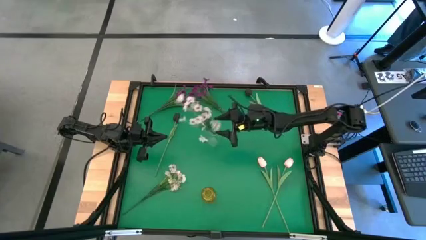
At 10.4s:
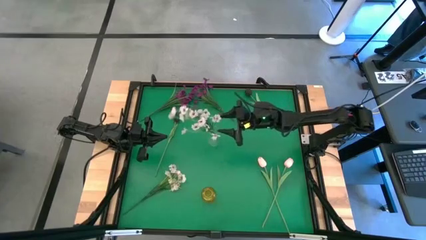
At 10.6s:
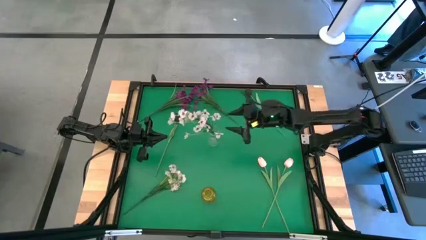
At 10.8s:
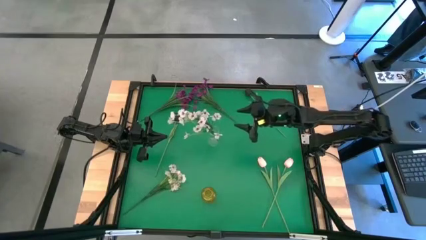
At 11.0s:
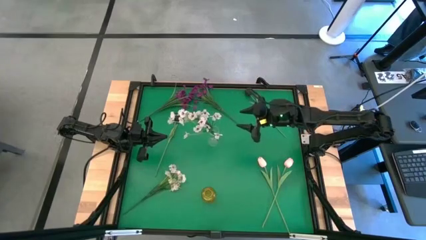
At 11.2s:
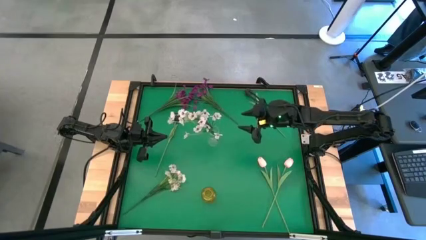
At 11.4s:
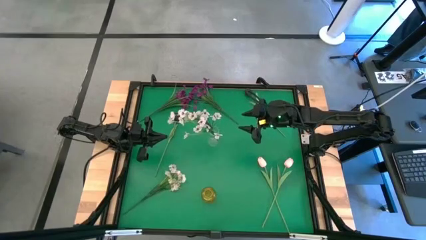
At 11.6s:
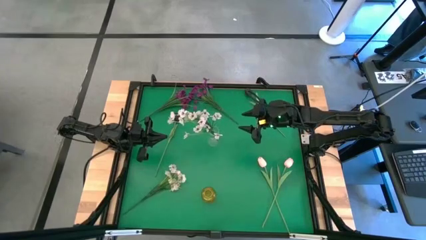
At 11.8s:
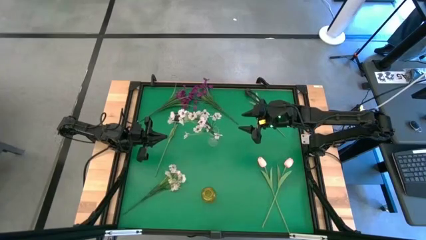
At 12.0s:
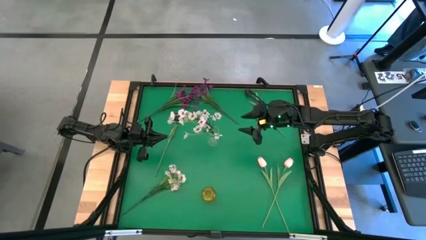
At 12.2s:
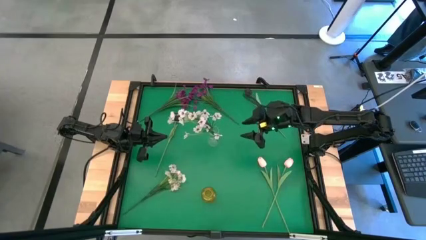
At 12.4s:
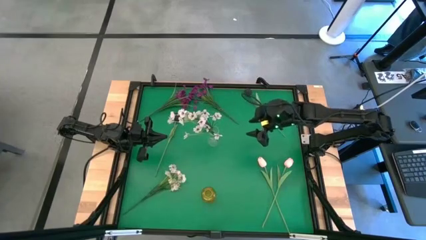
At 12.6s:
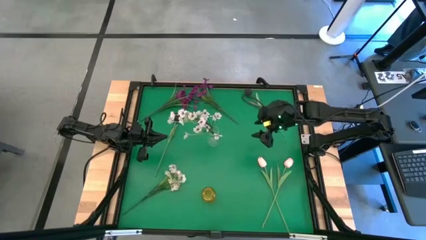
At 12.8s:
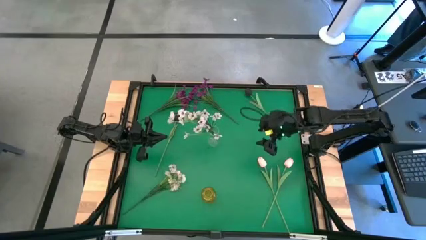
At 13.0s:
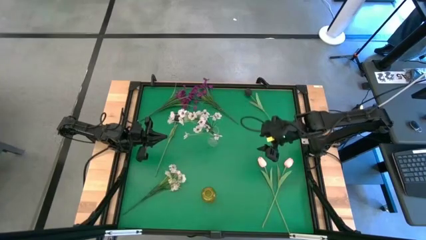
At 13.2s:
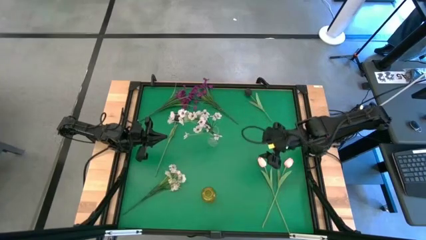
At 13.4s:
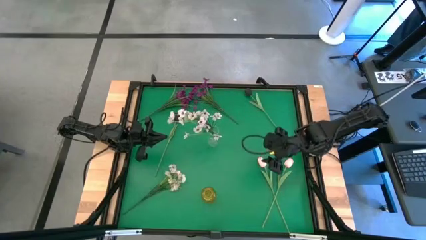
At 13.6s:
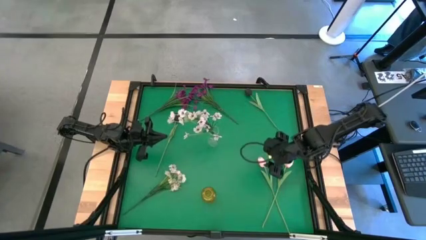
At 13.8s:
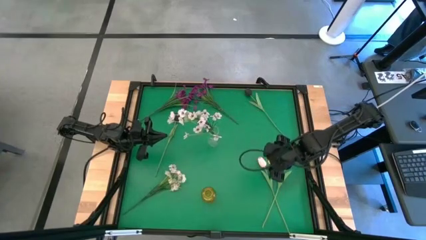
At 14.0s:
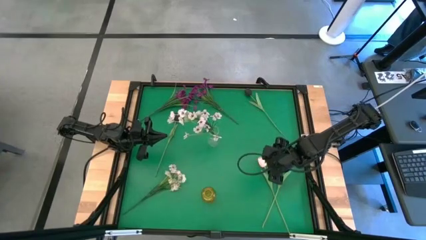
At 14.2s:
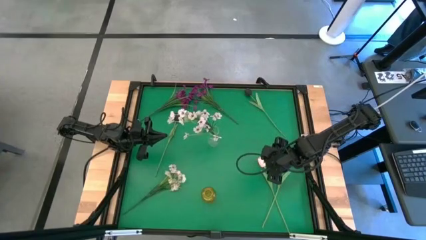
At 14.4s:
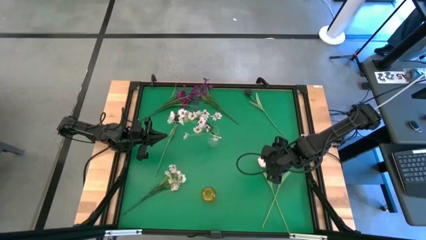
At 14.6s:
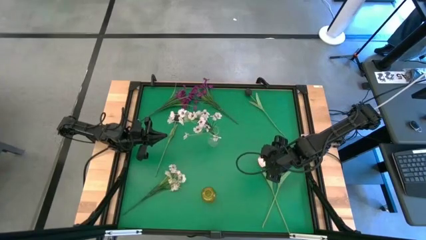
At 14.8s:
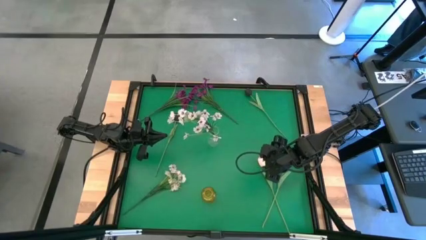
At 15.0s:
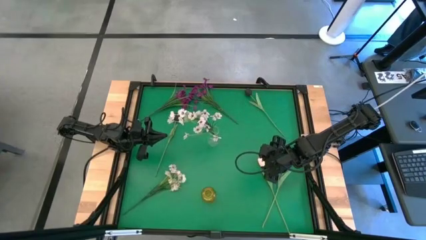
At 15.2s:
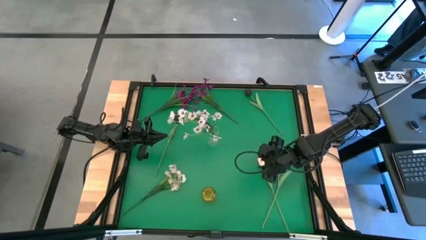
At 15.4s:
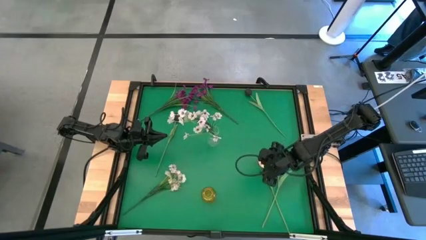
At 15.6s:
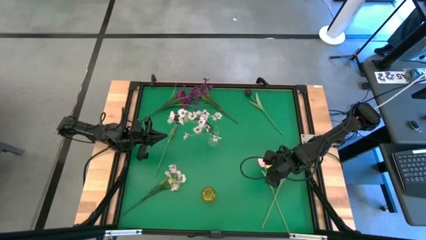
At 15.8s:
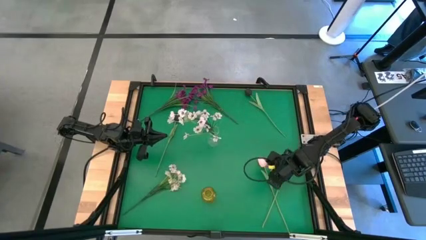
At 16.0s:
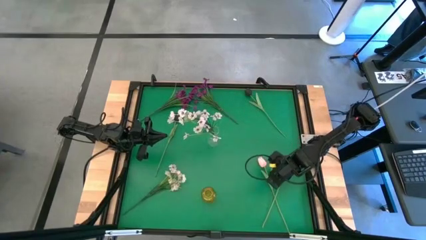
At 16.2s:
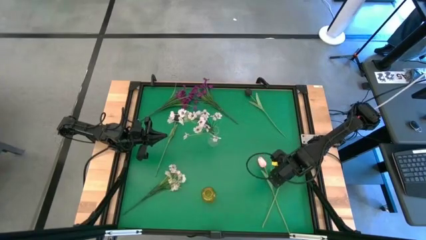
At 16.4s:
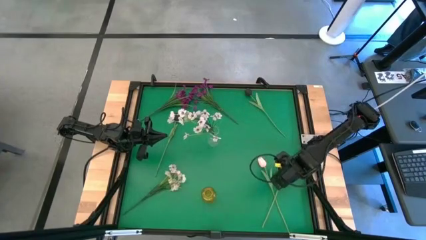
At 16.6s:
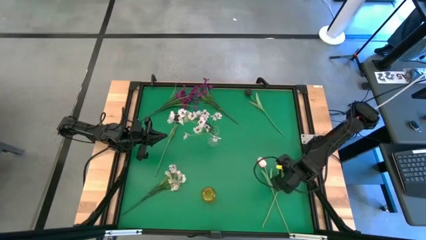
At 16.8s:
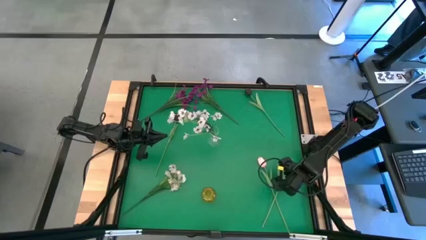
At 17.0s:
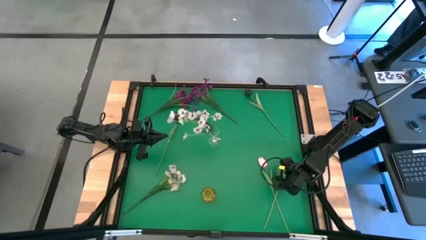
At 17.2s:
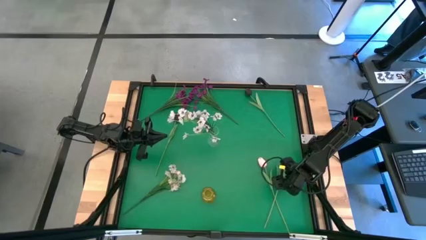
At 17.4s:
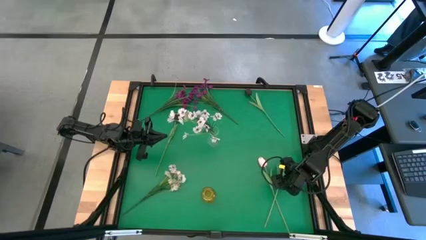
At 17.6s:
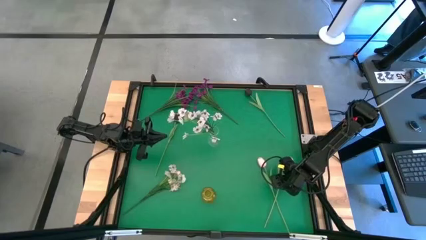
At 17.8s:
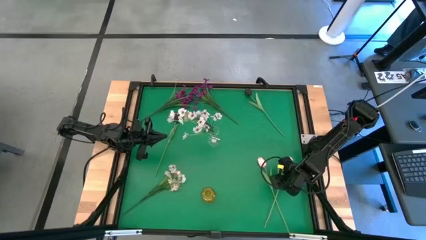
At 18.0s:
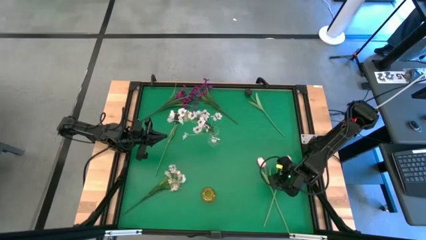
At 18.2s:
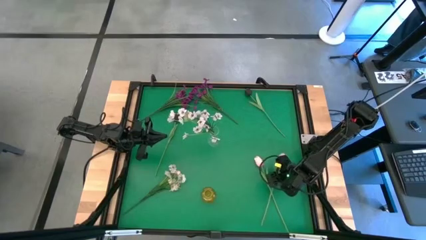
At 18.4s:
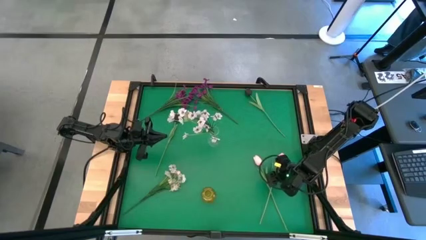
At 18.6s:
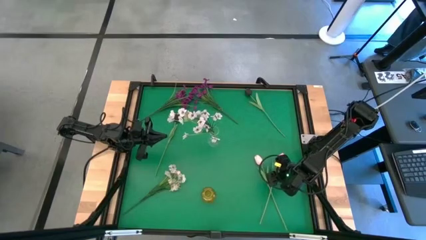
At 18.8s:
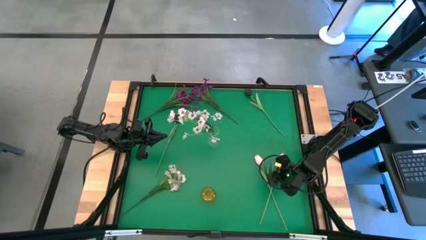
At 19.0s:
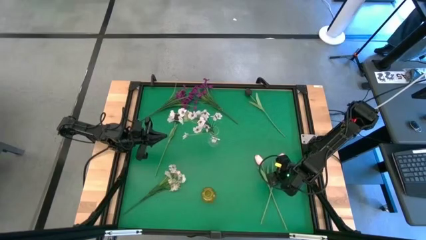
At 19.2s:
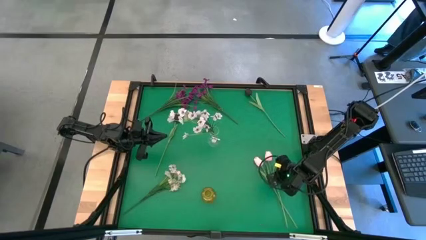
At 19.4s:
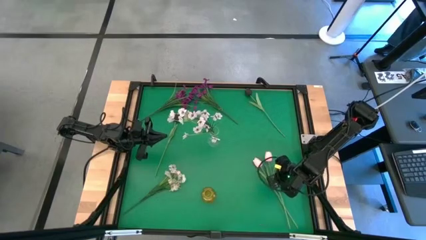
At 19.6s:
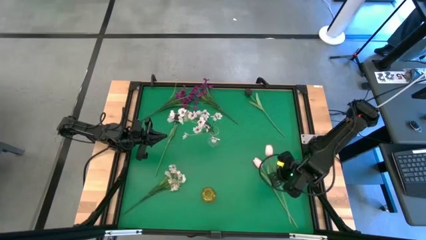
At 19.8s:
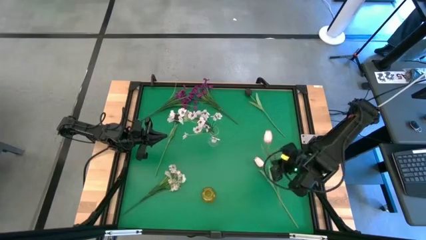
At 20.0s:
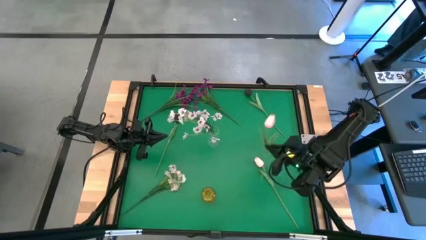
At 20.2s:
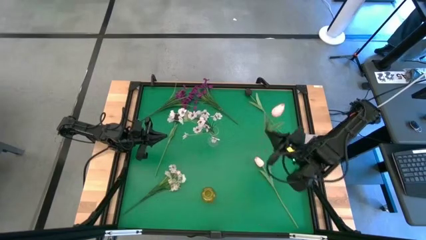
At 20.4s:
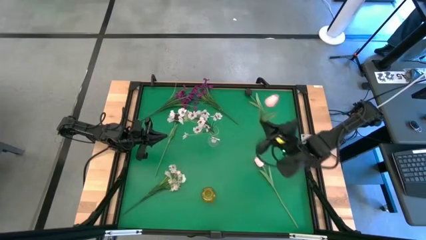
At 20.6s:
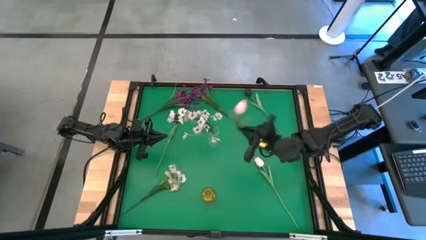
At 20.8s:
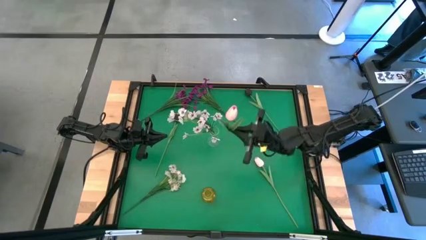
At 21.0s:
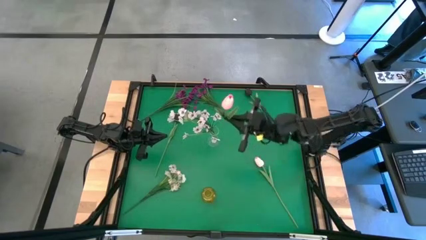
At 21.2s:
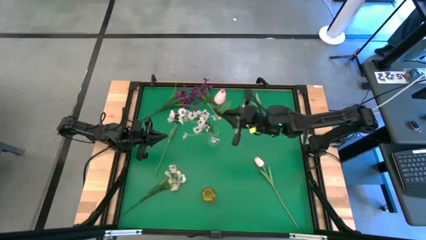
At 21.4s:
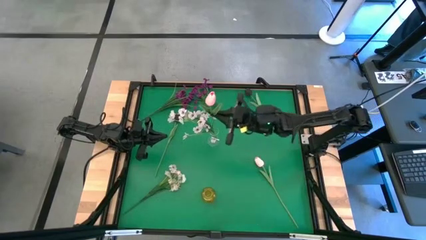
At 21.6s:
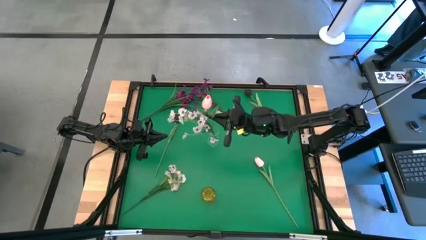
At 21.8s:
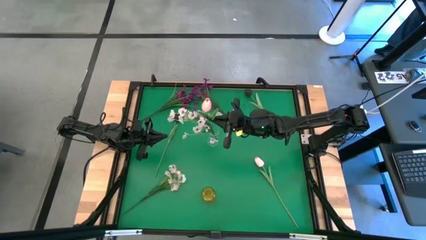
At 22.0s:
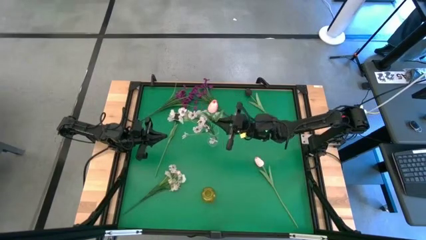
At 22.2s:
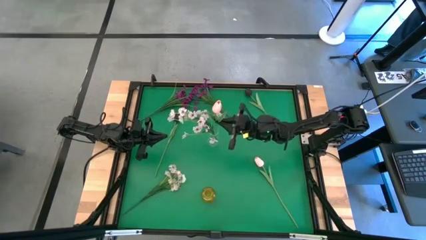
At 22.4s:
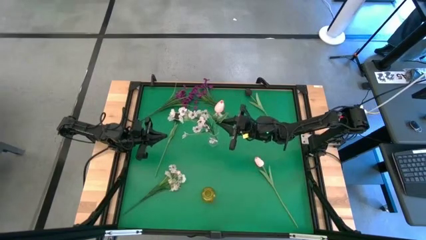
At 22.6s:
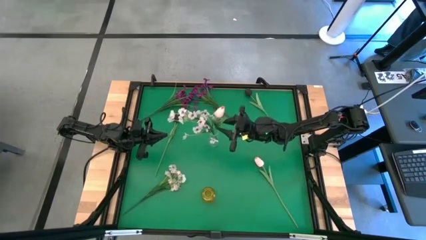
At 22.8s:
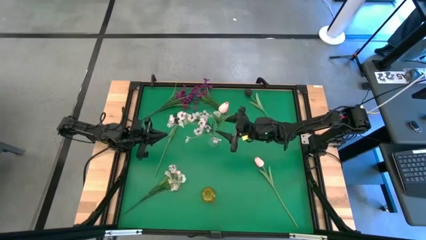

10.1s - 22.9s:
Task: Sort flowers into vase by color
Put the pink tulip flower into the transparent vase

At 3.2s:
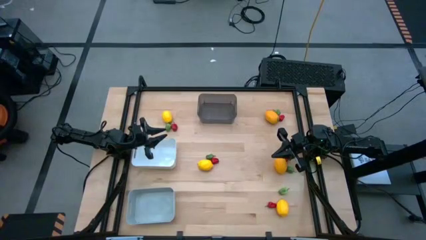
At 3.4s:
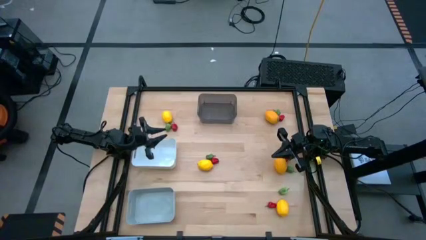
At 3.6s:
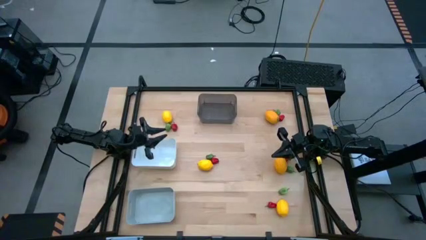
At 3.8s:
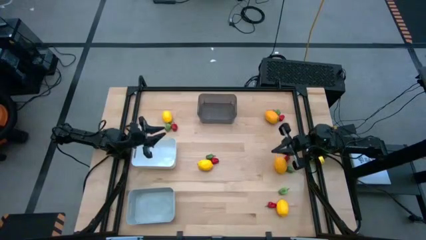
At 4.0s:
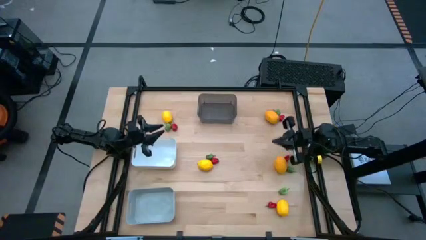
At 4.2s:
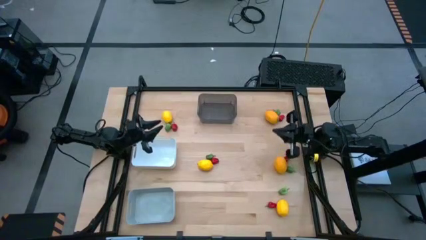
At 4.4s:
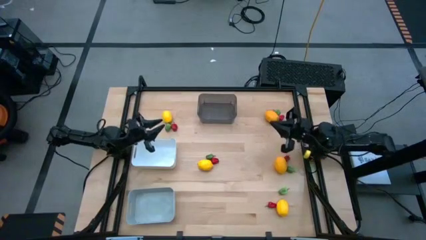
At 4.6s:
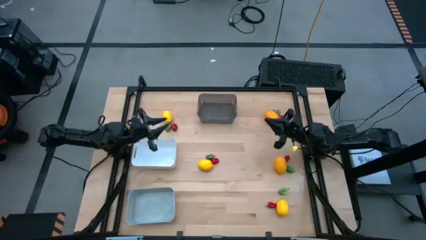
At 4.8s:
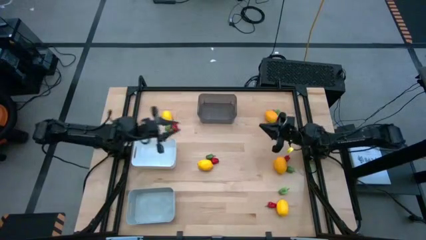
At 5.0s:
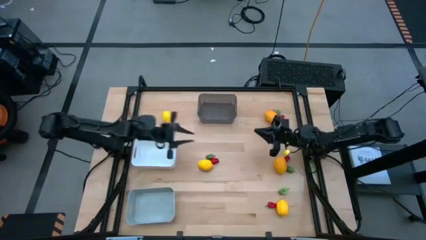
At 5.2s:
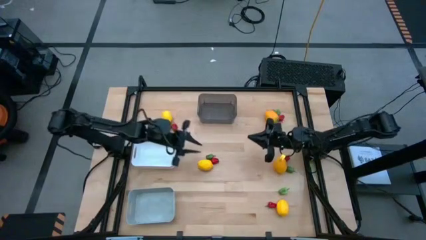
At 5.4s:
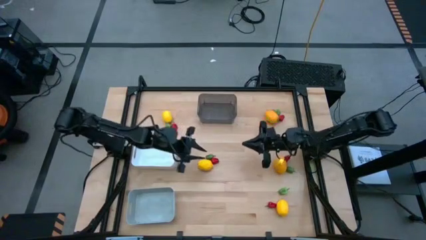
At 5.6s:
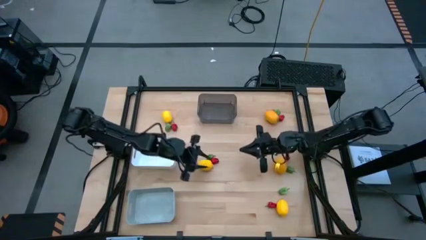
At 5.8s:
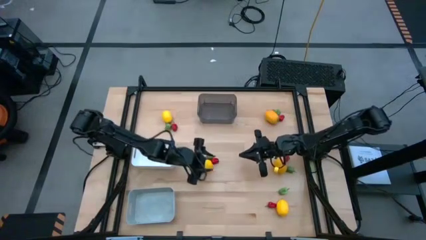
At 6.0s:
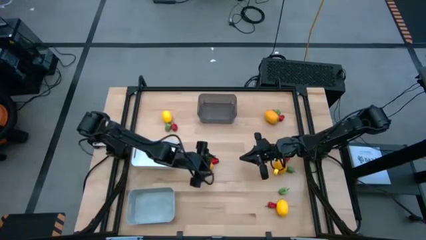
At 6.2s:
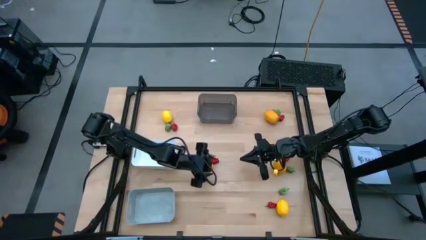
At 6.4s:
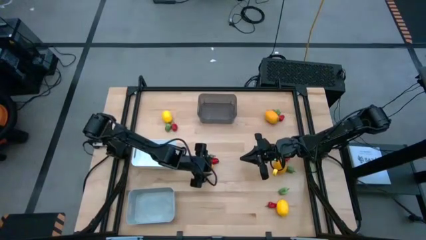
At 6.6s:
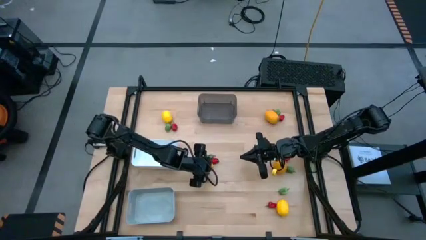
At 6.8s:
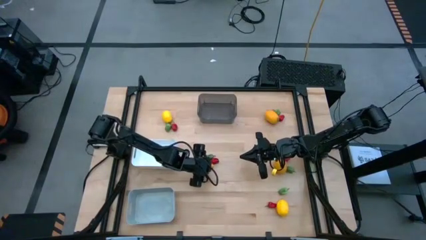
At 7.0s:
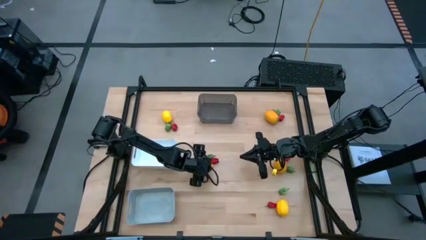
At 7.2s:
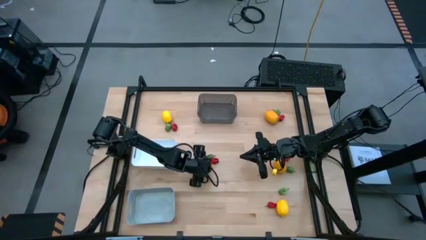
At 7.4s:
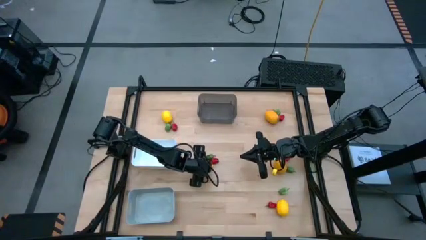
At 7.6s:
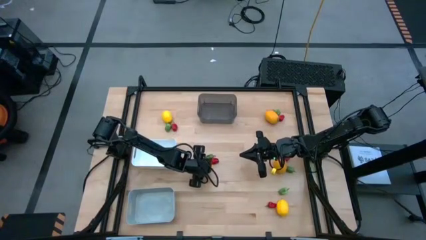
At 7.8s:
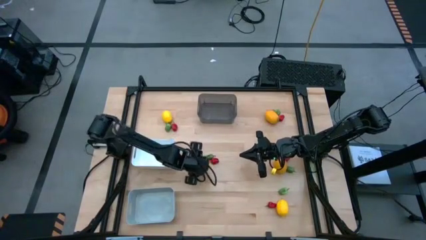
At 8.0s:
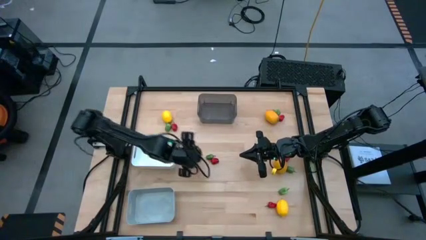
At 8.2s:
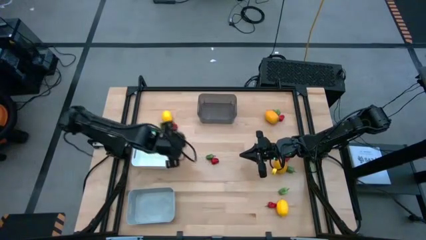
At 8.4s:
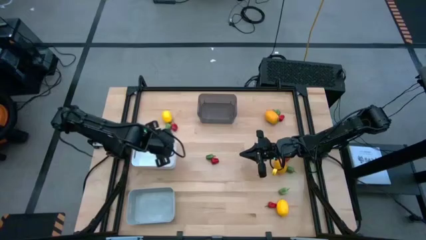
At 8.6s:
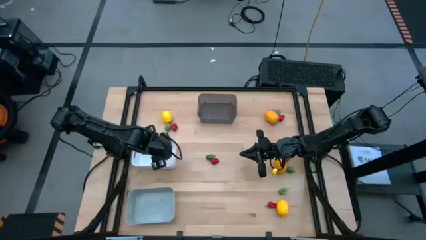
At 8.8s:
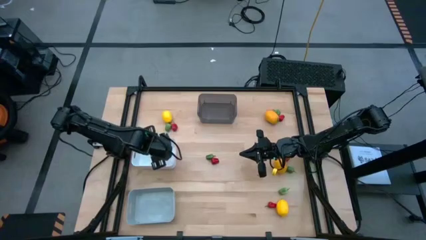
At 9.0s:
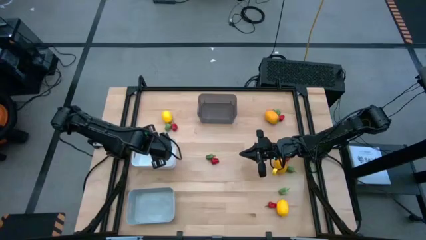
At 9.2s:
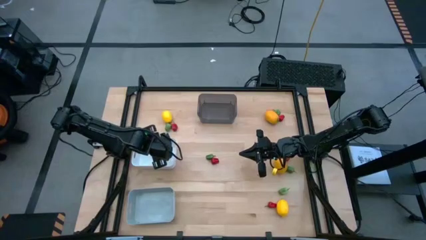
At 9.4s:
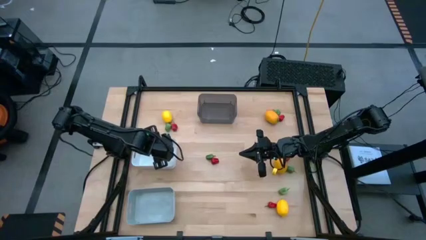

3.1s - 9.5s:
Task: Sort produce into baskets
Put the lemon into the white bin
